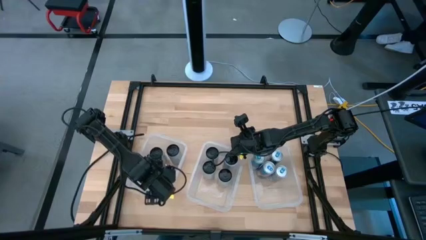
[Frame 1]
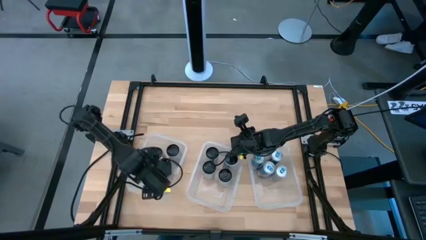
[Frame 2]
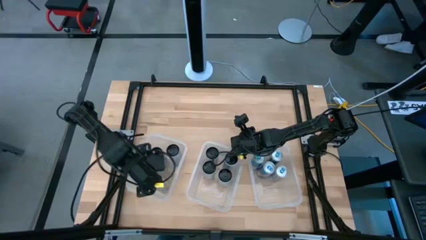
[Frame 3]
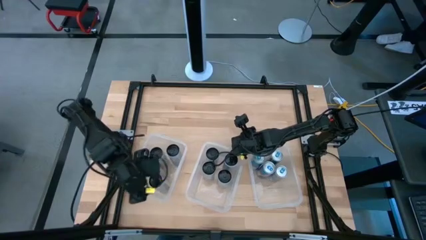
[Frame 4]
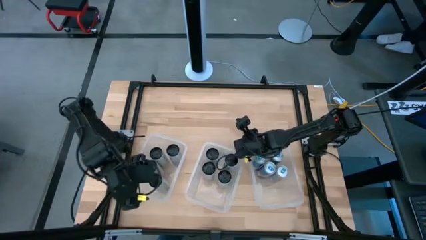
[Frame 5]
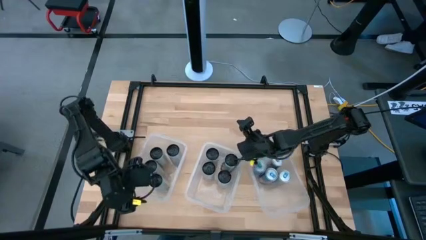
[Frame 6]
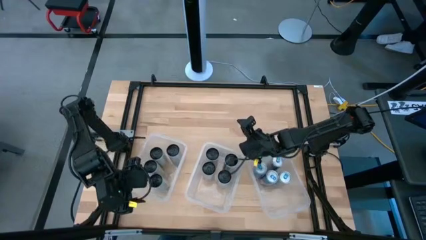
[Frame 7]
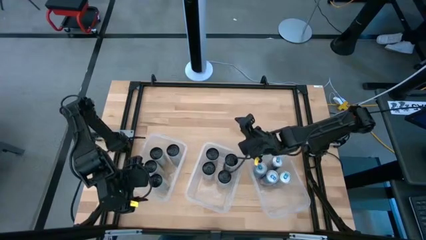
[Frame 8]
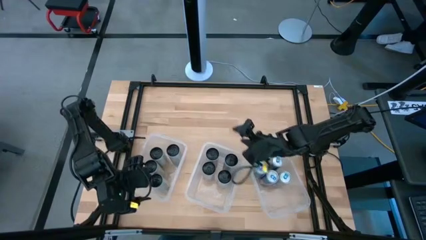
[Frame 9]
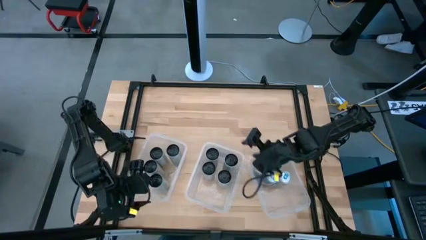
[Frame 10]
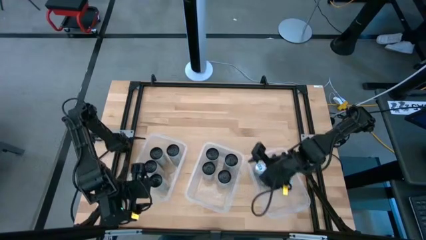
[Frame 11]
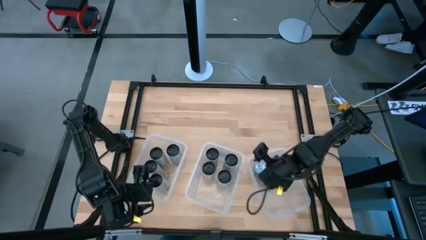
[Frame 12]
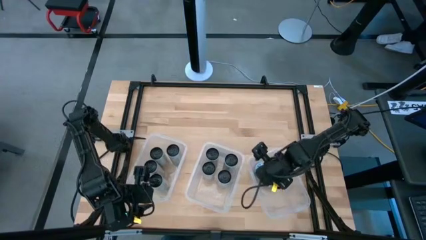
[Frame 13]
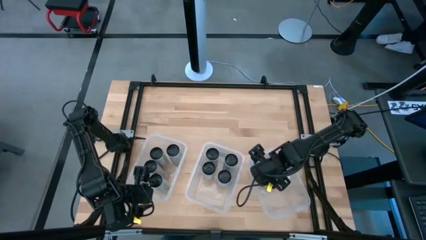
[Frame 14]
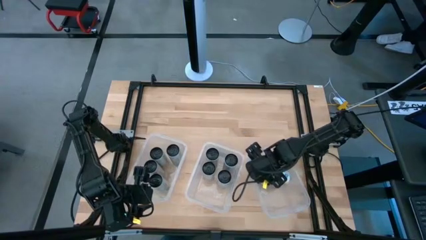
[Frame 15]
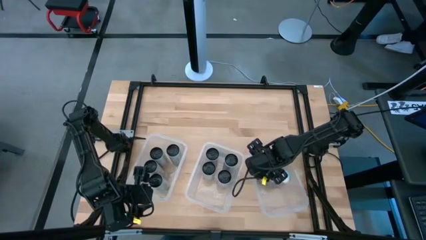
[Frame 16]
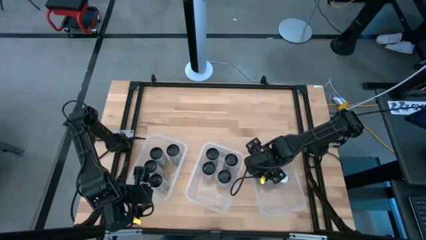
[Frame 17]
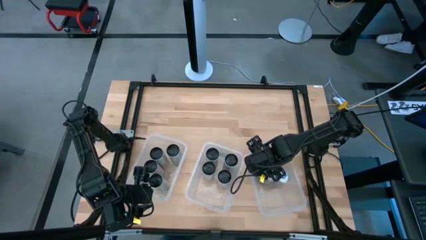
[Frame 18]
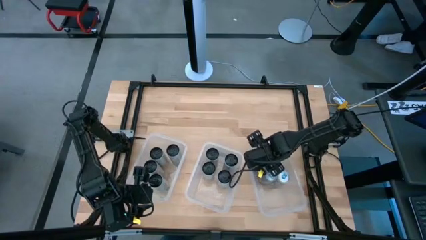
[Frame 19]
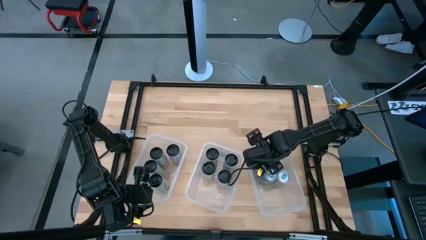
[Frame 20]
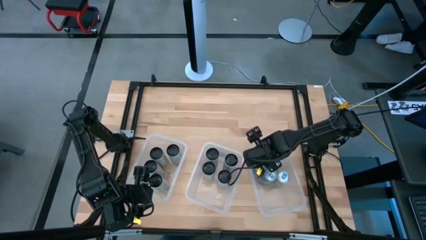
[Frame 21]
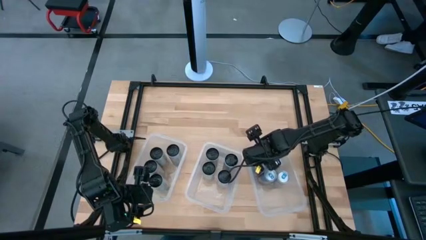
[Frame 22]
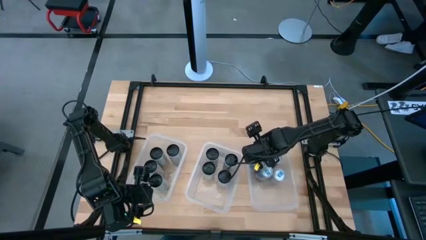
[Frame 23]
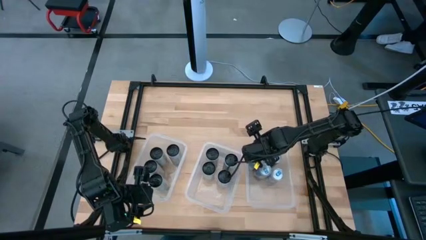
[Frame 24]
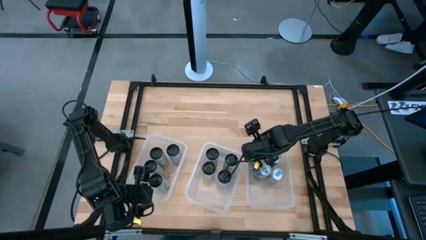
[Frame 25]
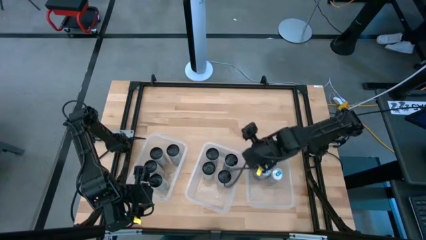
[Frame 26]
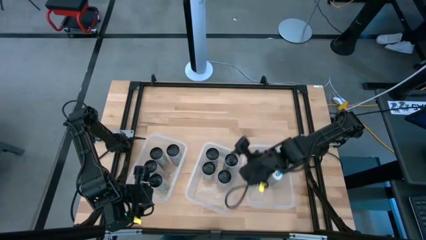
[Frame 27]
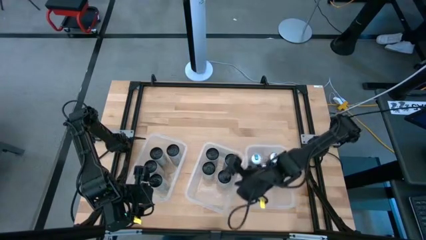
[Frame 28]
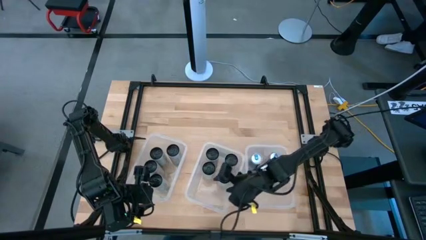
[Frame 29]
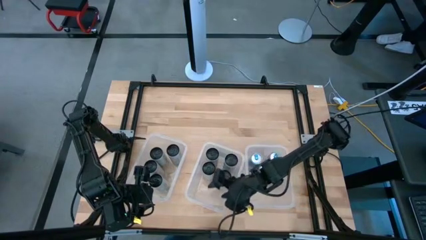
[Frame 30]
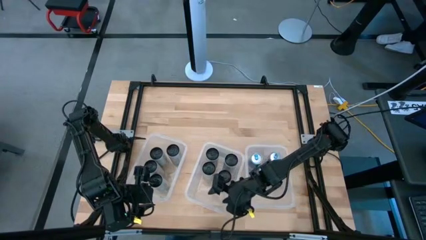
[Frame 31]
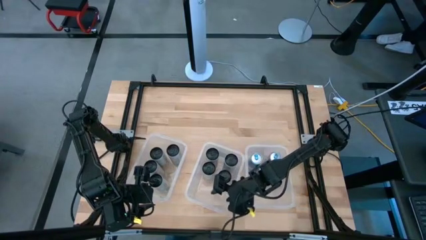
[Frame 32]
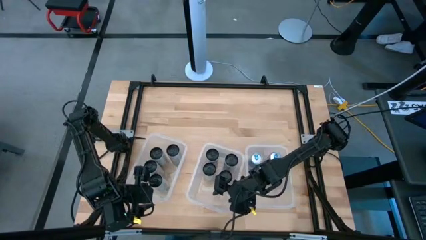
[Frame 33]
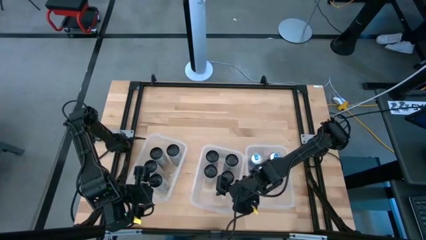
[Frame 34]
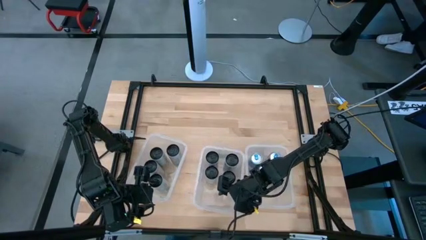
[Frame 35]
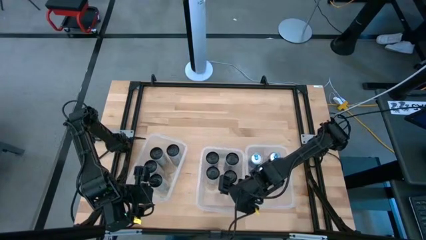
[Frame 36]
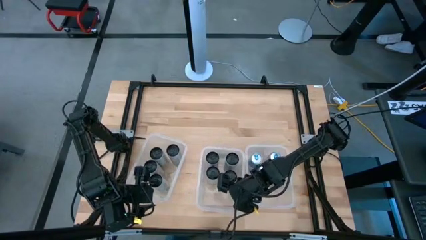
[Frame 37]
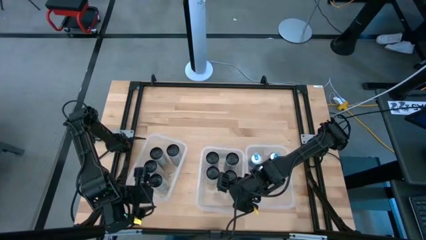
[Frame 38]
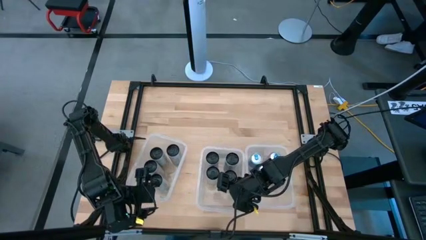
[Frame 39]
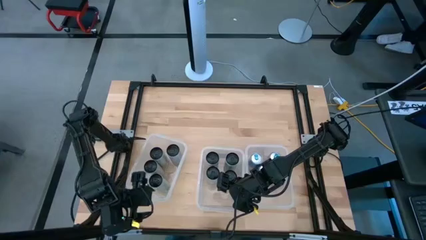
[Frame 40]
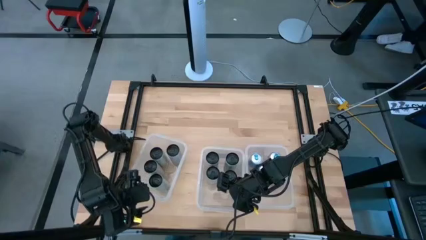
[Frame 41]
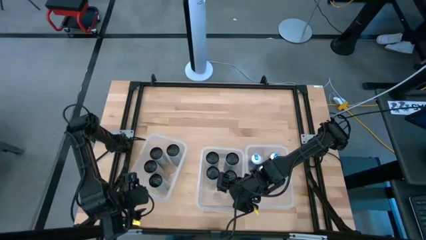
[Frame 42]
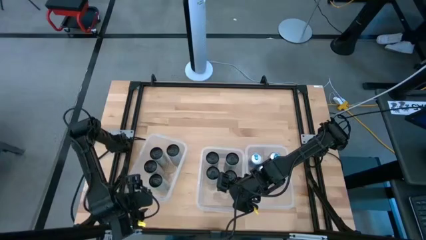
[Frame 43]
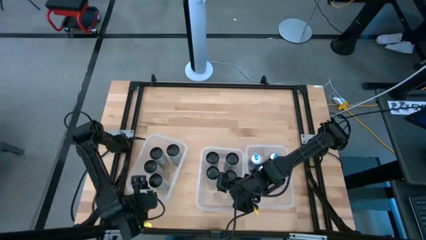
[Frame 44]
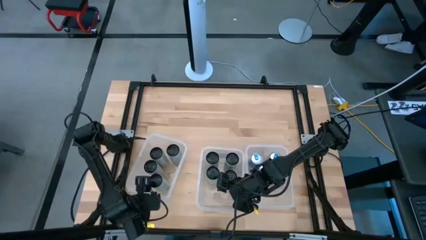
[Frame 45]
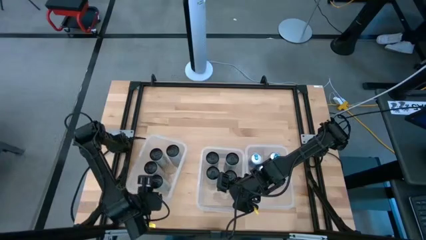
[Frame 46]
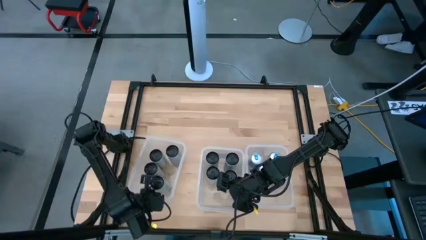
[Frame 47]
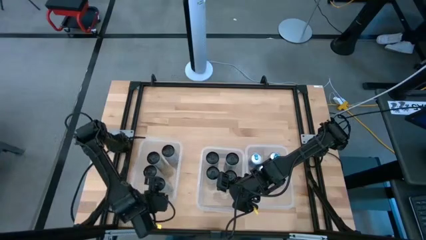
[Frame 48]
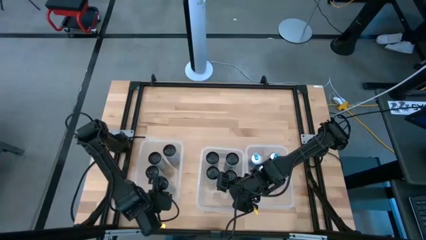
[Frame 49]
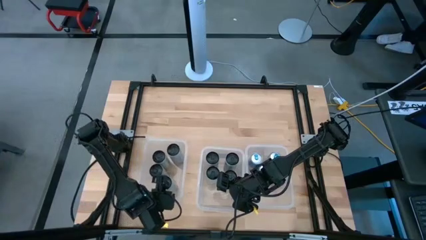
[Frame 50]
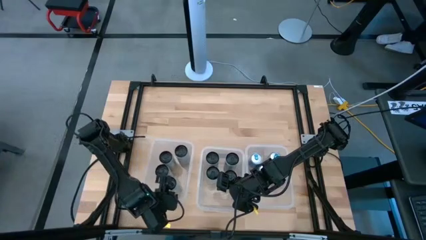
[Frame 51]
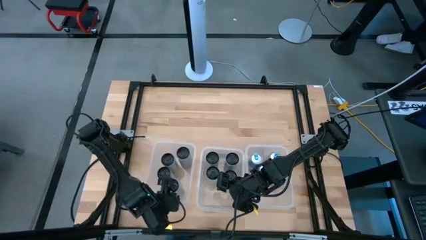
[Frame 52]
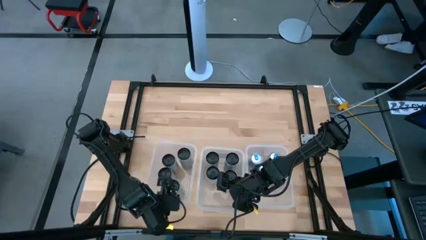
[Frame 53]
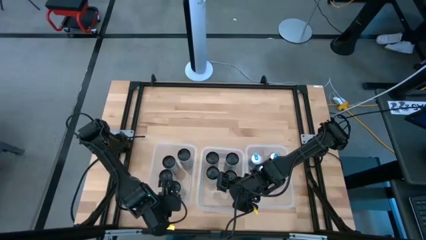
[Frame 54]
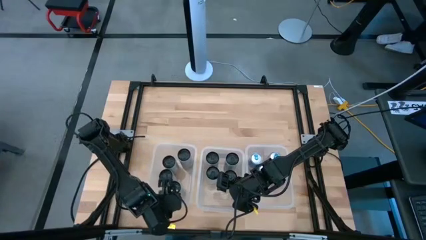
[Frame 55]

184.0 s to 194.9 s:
Task: Sort soda cans
Adjust the transparent bins
